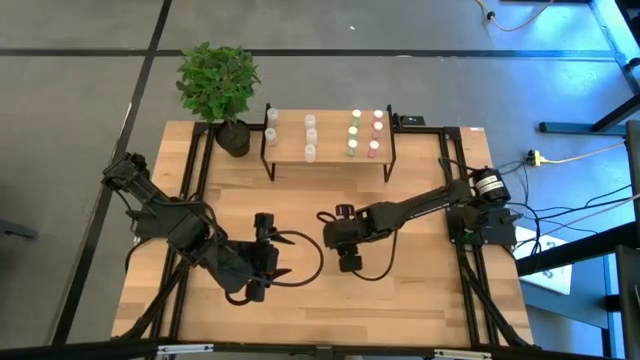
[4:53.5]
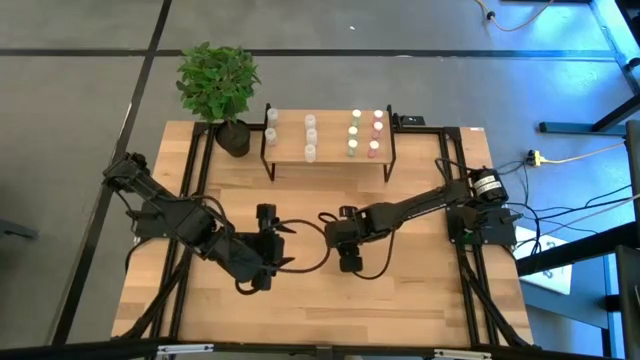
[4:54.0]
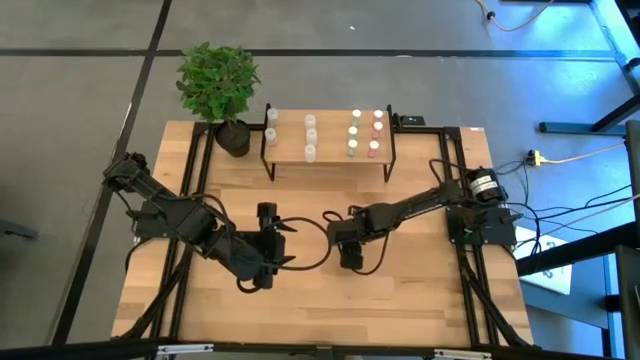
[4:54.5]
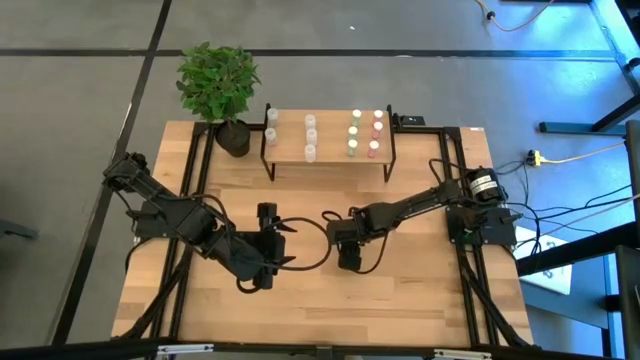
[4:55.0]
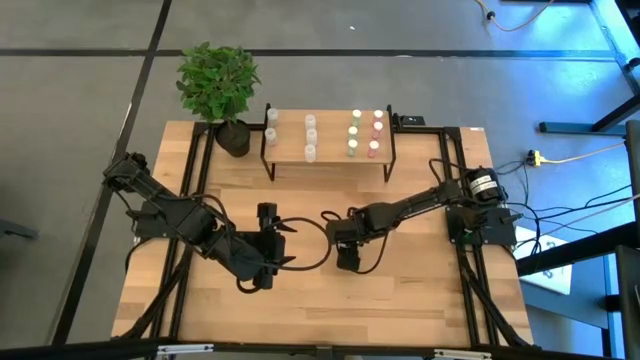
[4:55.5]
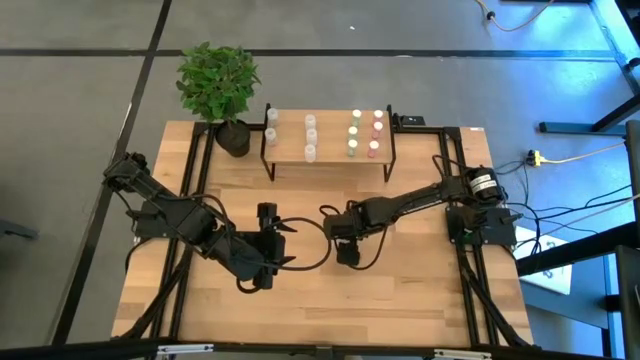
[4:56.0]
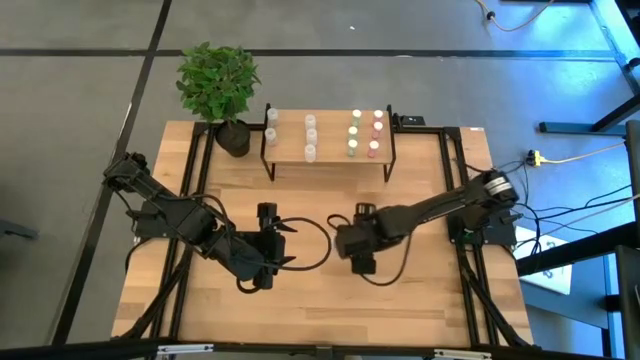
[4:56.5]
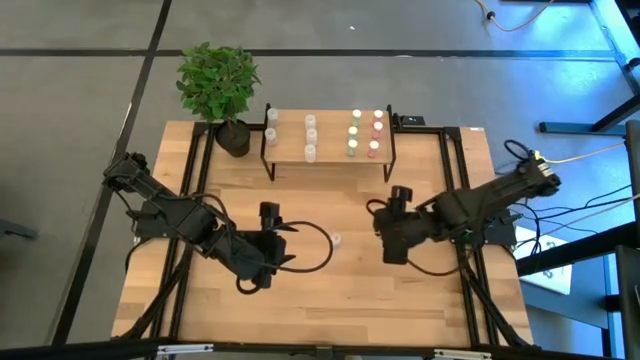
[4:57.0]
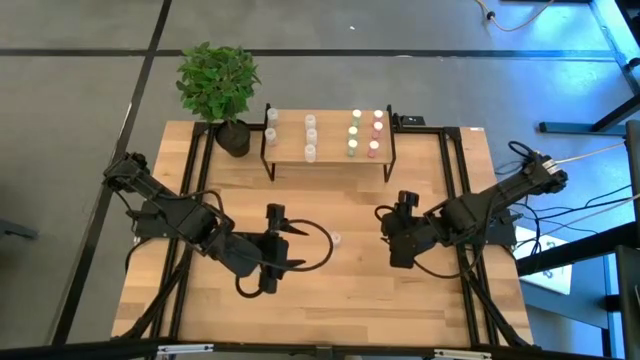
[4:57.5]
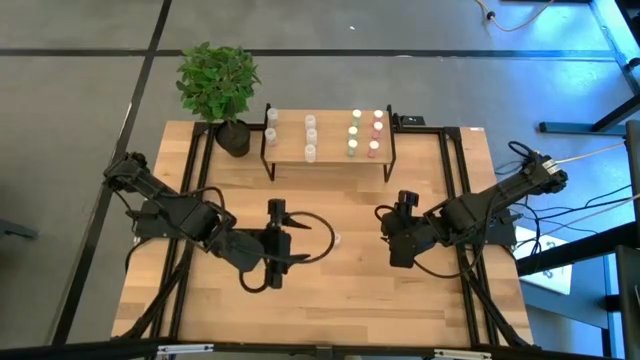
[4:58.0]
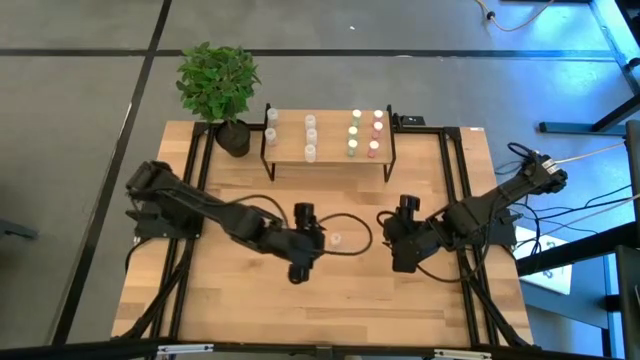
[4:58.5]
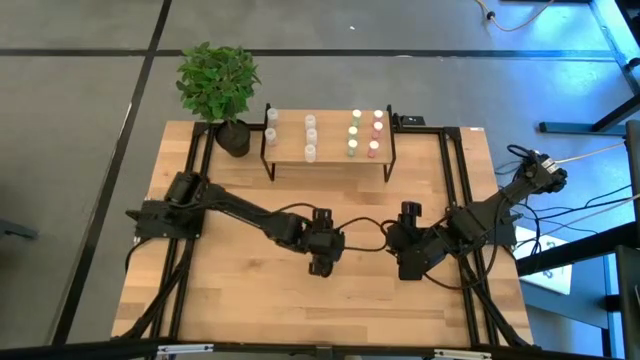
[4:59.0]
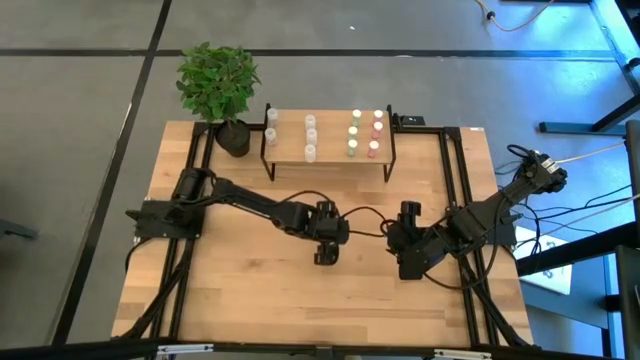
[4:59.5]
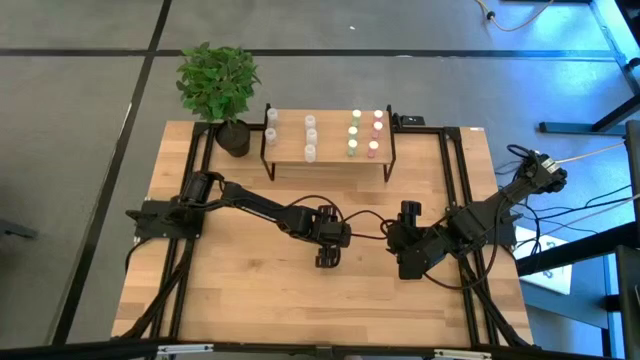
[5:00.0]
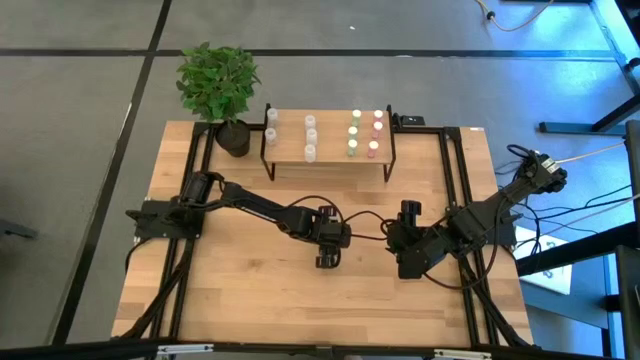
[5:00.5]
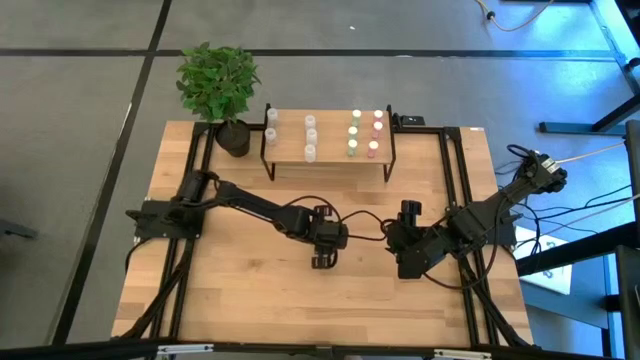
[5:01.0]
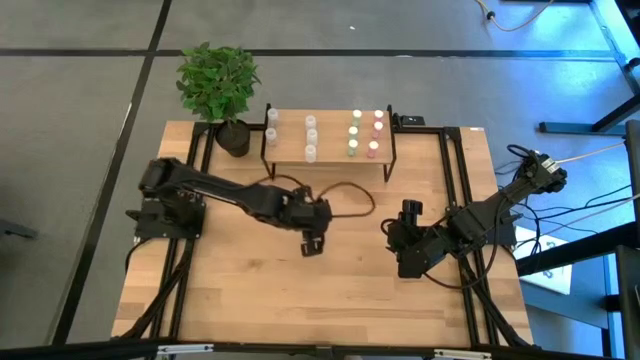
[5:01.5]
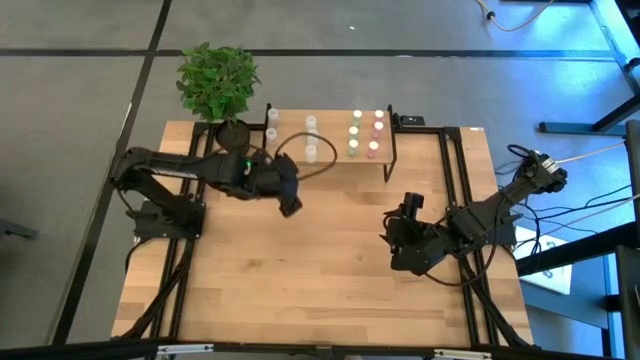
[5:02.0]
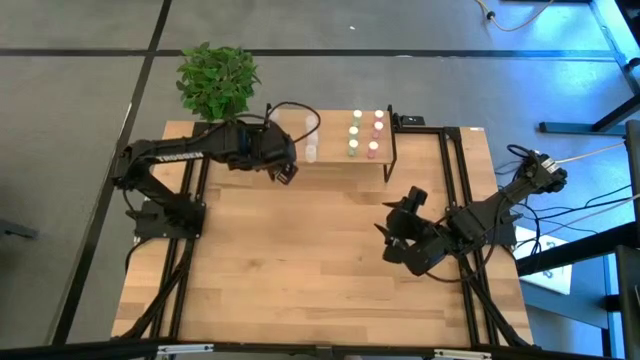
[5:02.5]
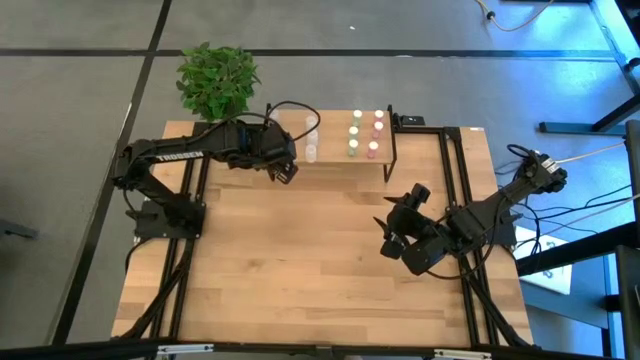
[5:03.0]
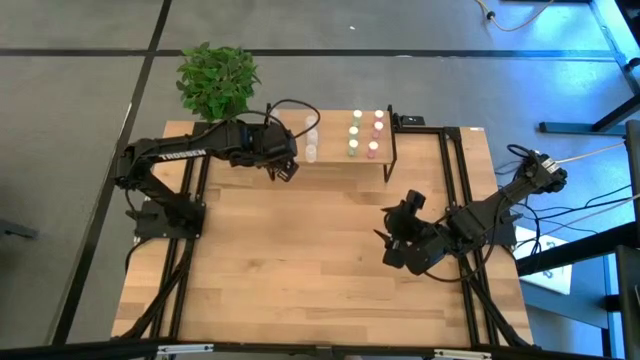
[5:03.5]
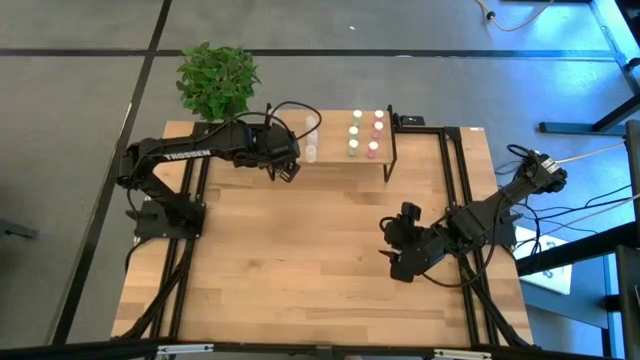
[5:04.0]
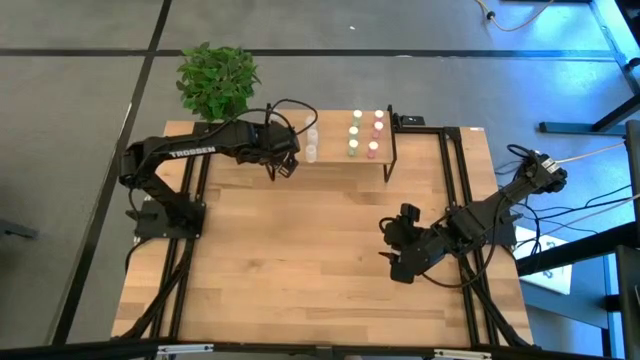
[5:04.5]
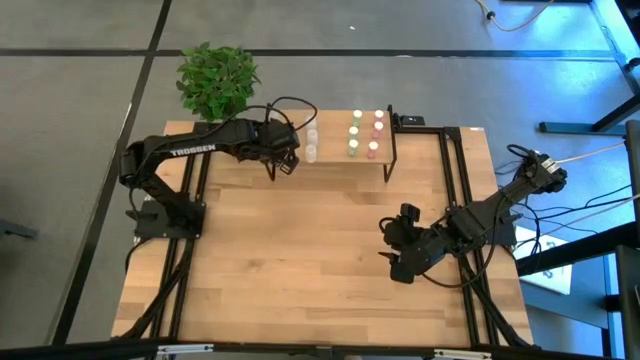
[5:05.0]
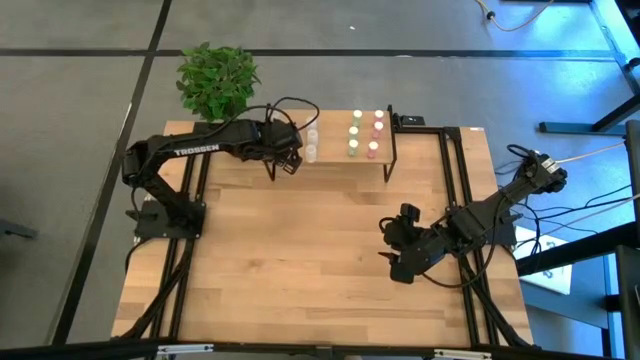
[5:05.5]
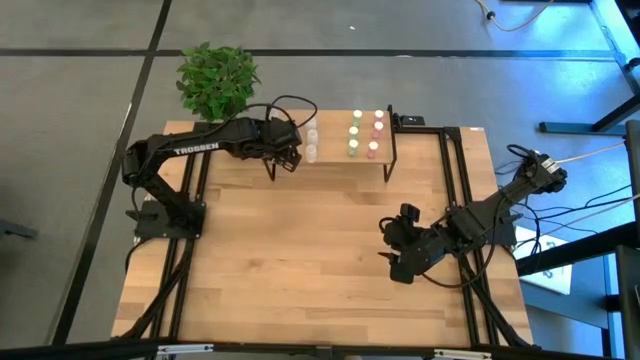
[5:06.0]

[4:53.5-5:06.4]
Task: Pick and place medicine bottles onto shelf by color
Put the transparent pill bottle on the shelf aligned with the other transparent pill bottles

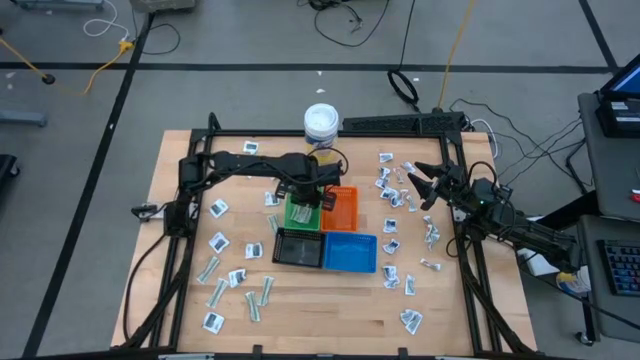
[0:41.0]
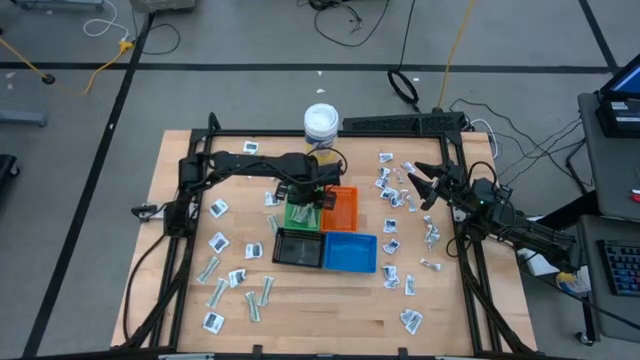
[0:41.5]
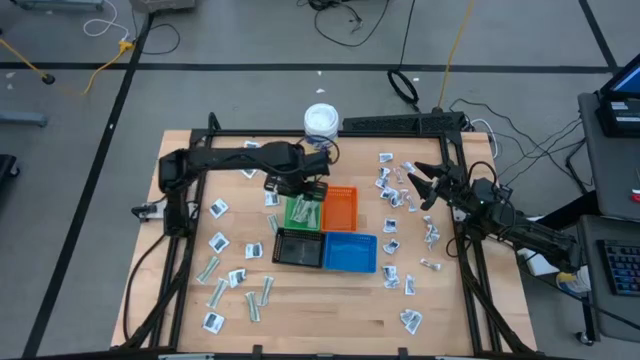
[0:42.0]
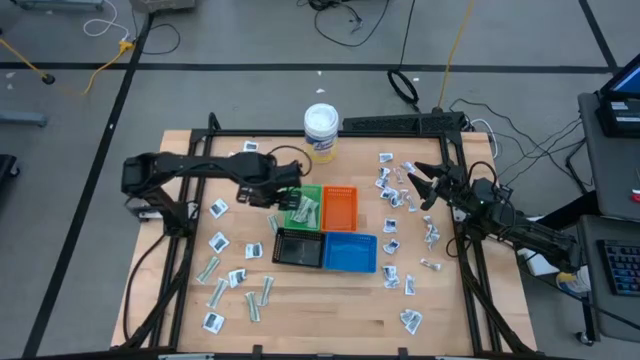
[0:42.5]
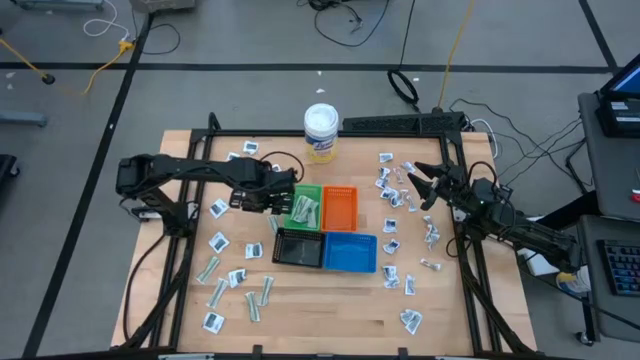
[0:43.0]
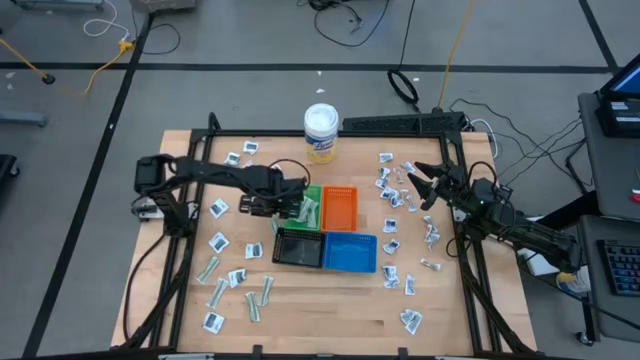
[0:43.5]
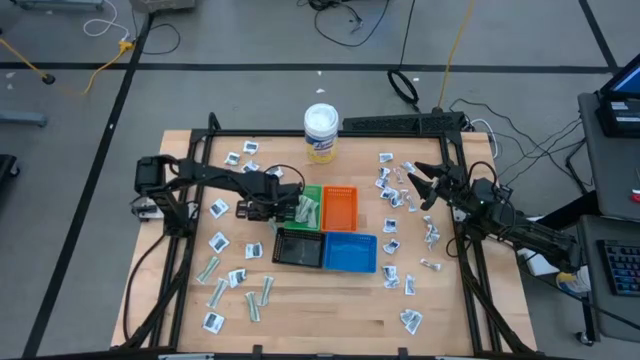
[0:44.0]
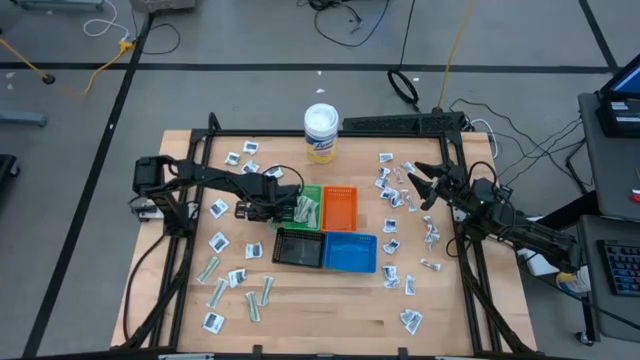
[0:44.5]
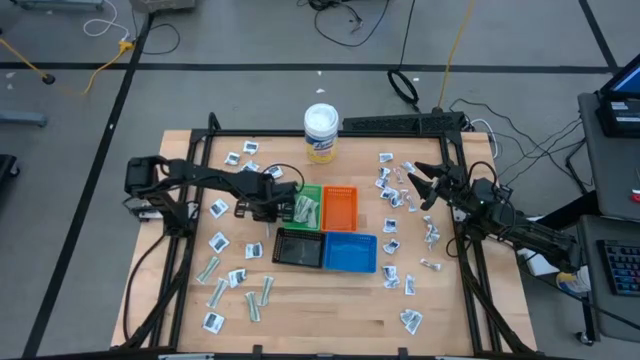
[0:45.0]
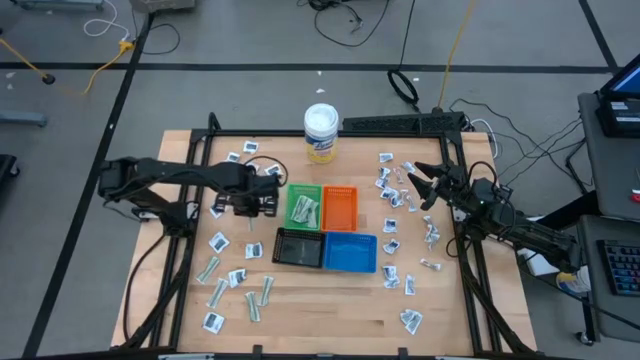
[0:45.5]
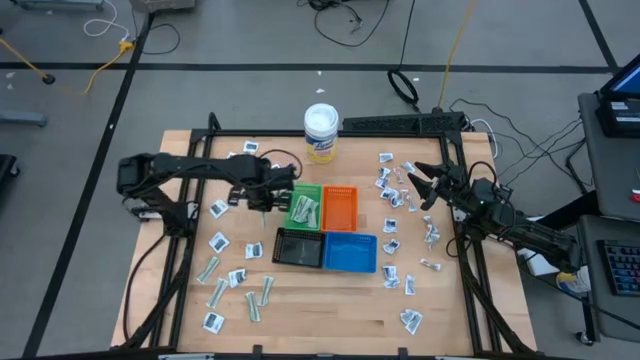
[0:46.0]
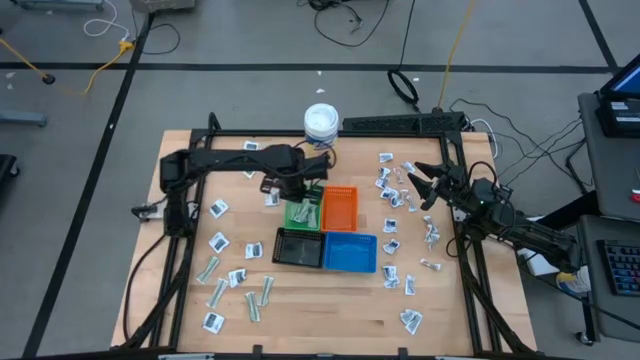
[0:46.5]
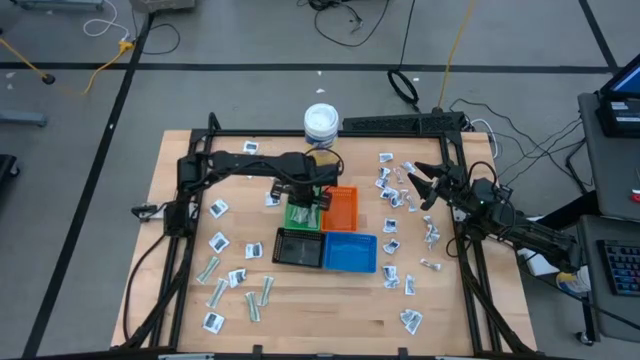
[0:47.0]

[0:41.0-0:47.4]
Task: Pick & Place First Aid Supplies
Put the bandage pack into the green bin
